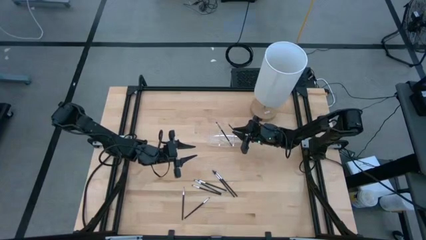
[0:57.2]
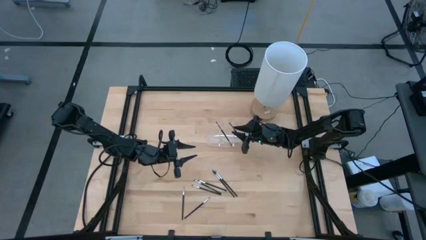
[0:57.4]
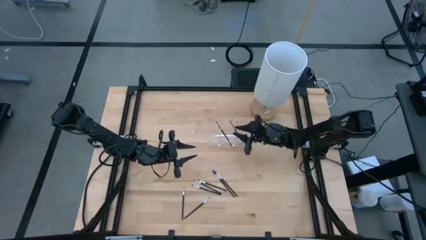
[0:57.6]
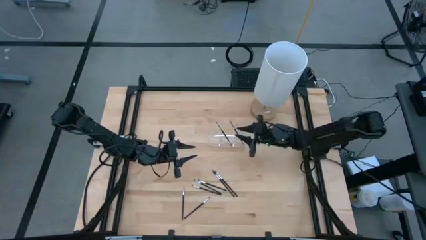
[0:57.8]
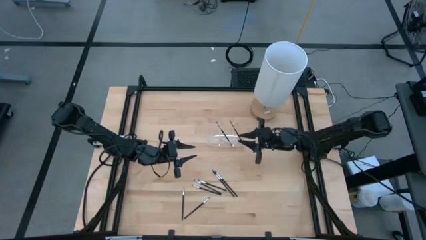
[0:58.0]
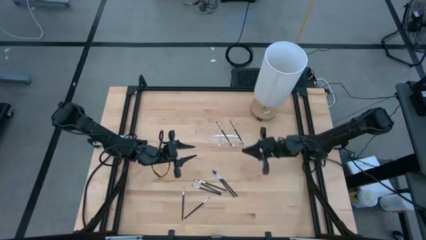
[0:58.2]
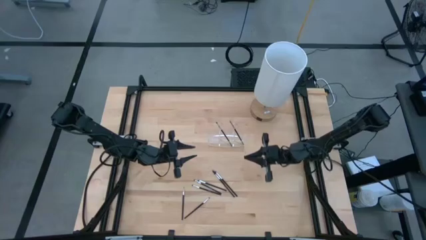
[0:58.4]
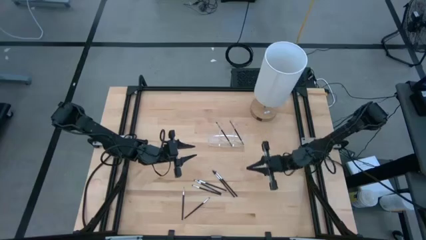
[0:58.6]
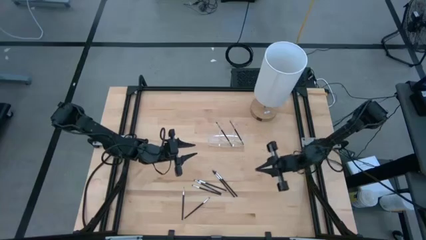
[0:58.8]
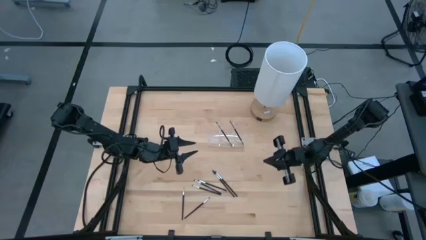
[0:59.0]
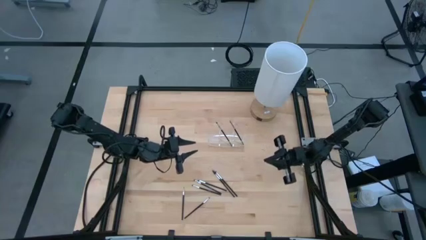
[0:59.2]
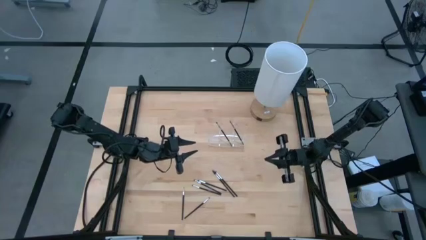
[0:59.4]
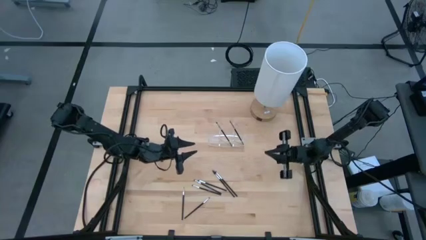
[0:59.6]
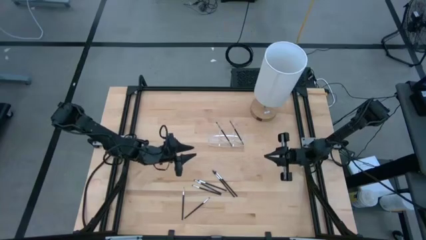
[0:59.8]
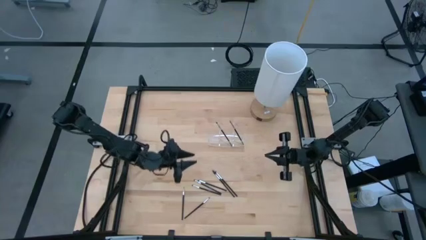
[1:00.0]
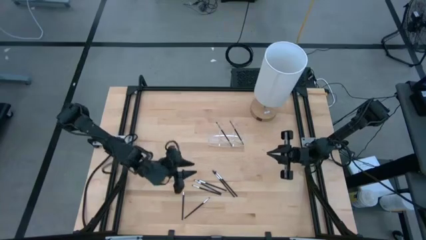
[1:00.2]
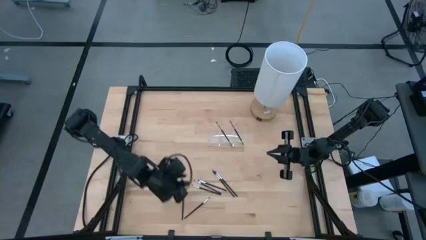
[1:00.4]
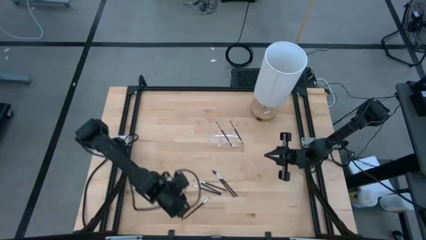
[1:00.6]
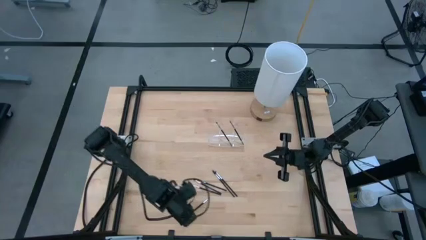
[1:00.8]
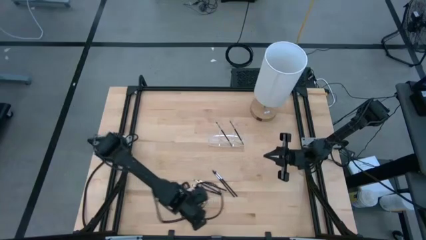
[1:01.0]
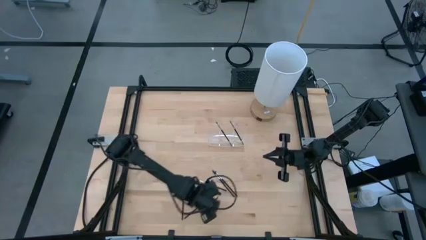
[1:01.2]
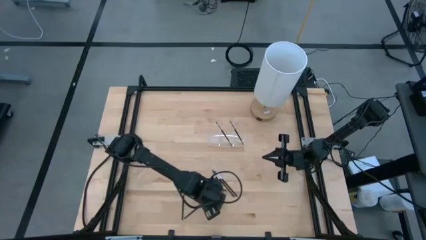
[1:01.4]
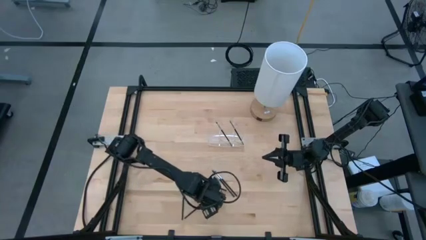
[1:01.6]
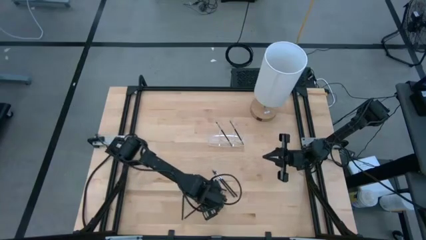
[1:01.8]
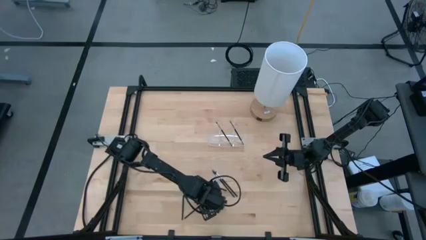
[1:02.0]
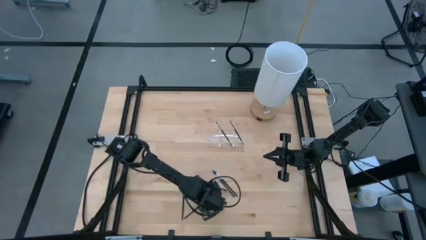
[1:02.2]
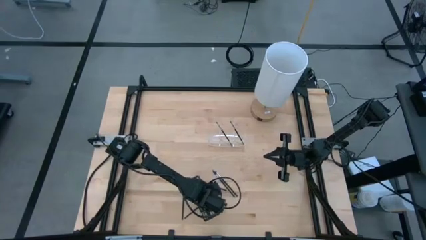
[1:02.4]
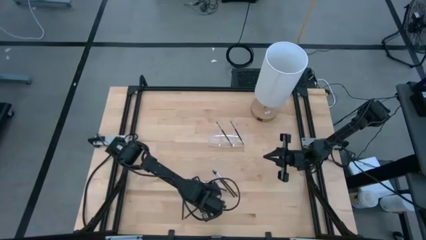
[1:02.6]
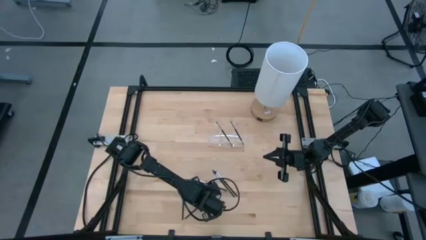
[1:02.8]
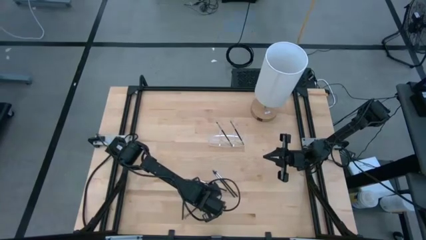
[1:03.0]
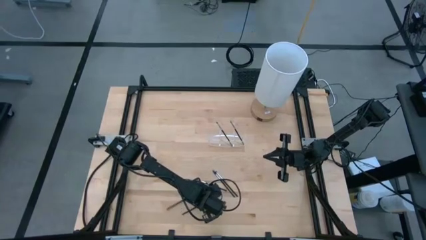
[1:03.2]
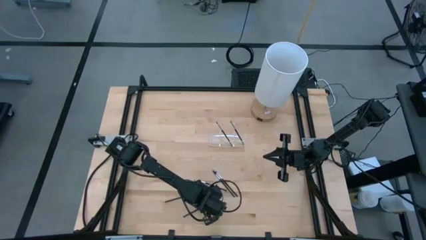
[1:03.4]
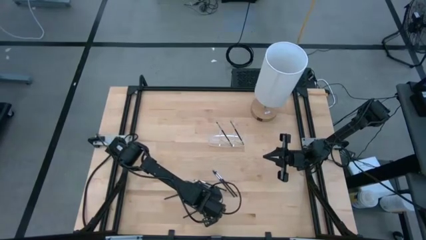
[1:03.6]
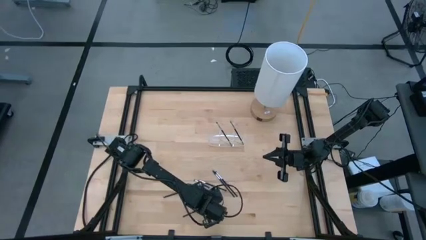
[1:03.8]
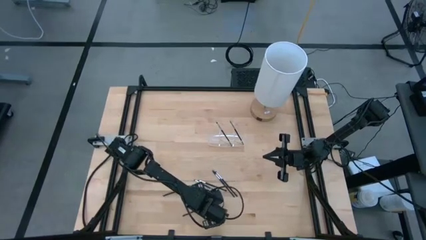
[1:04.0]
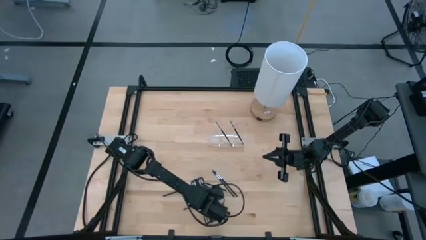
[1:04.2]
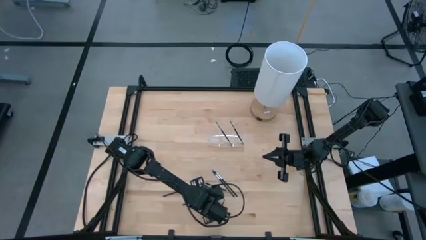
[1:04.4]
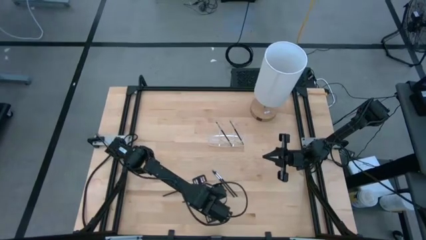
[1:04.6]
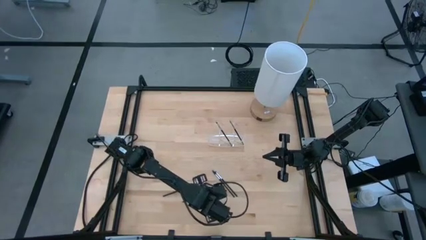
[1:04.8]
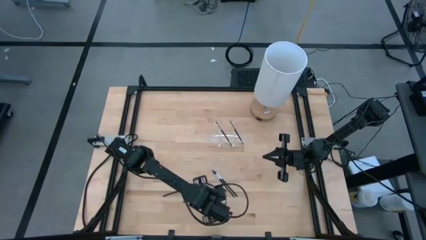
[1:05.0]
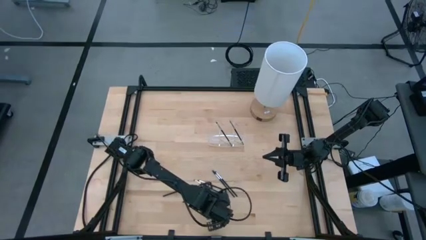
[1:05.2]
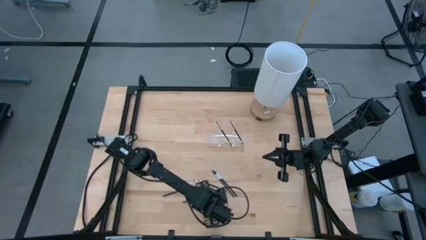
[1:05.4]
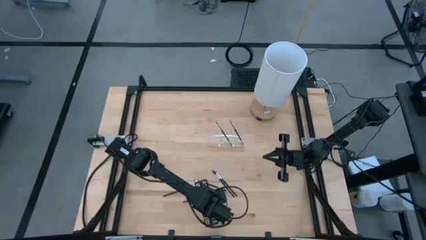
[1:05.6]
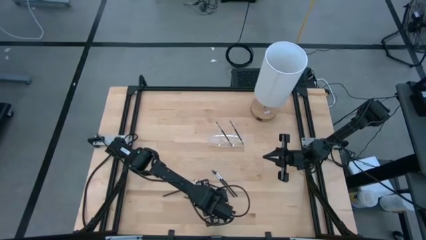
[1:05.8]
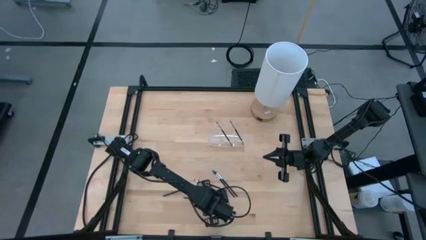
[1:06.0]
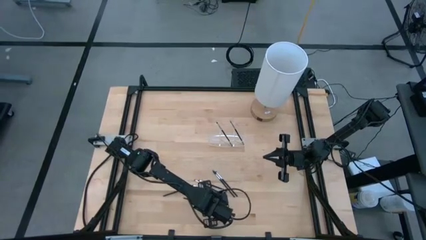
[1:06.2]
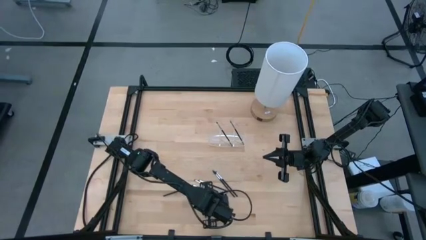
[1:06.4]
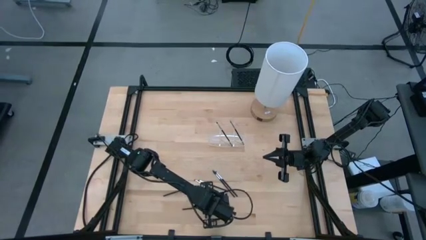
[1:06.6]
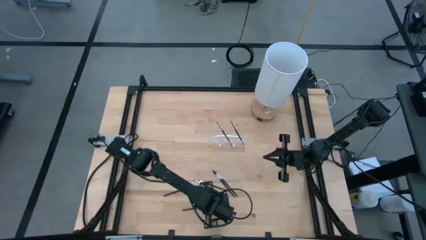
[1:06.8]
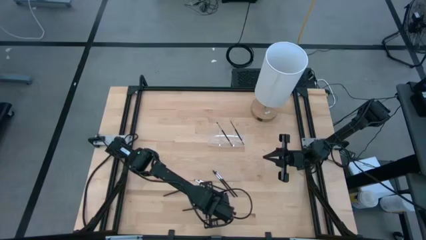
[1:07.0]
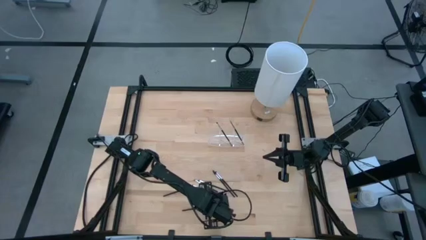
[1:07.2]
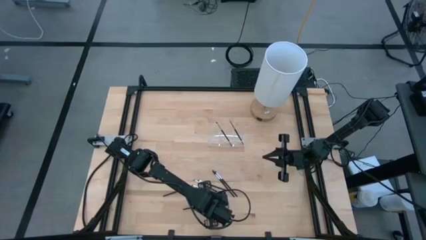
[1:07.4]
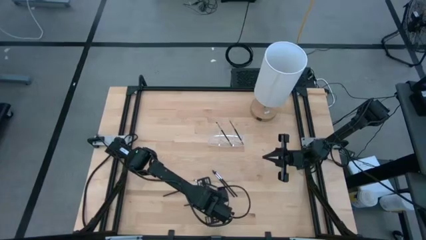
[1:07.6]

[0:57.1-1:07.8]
Task: Put items in baskets/containers
Put the black eyeshadow brush into the left section of the transparent organizer

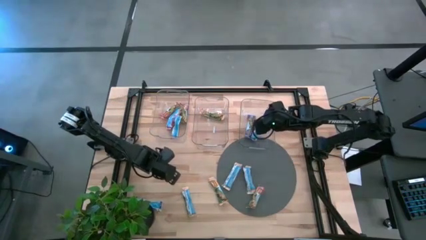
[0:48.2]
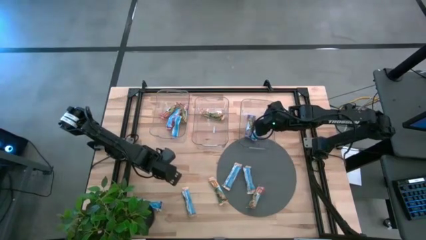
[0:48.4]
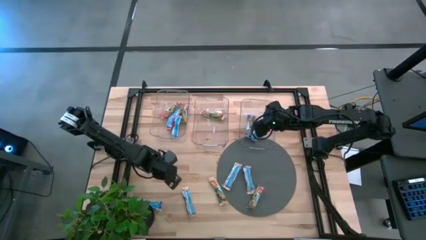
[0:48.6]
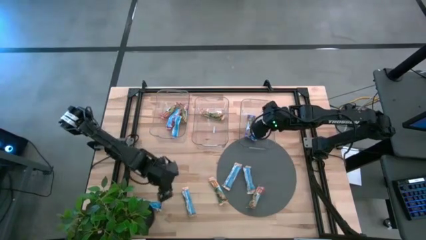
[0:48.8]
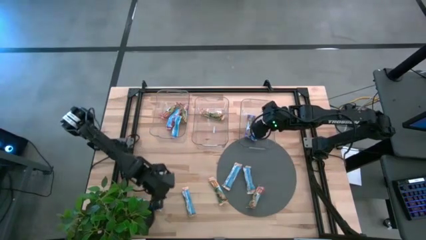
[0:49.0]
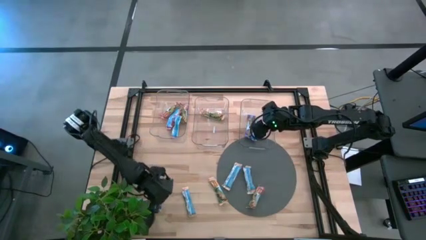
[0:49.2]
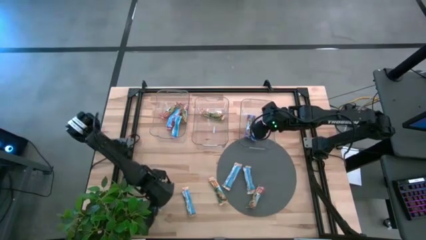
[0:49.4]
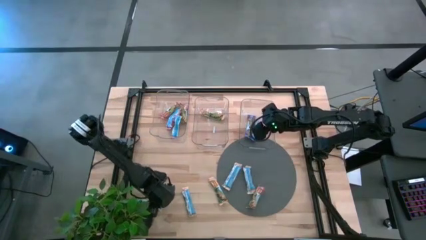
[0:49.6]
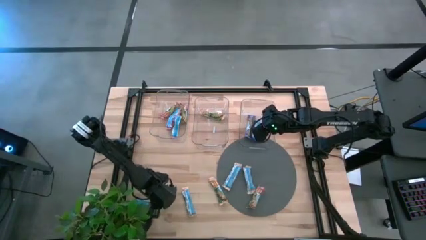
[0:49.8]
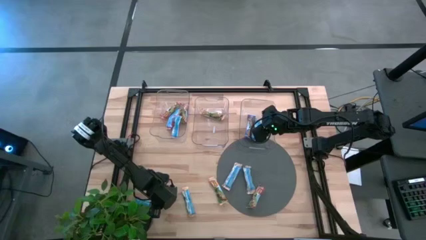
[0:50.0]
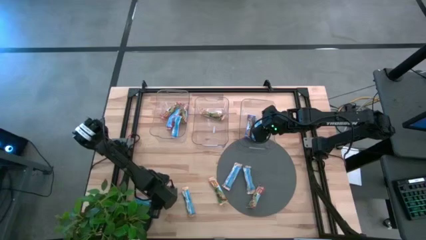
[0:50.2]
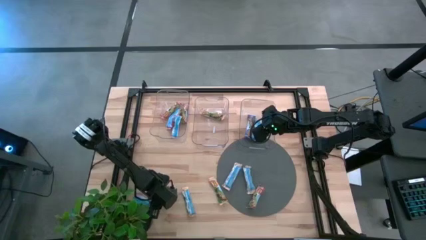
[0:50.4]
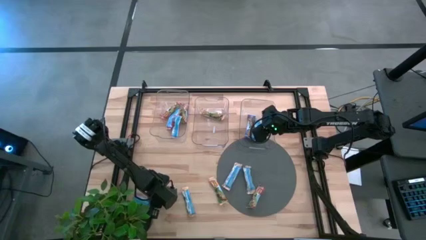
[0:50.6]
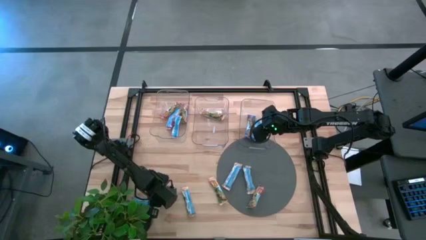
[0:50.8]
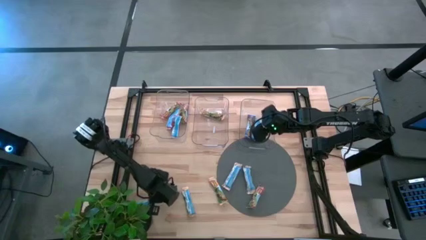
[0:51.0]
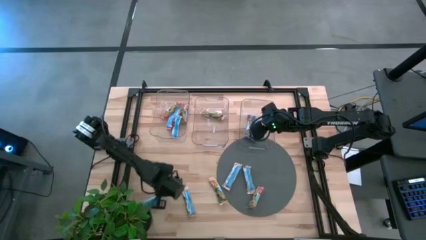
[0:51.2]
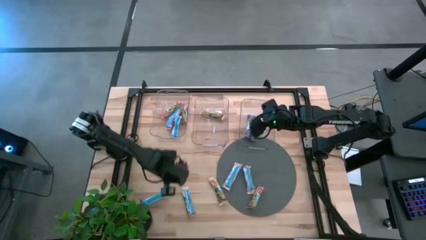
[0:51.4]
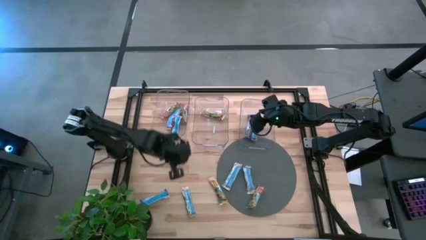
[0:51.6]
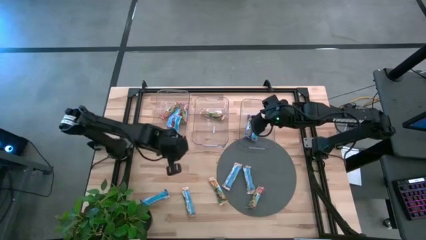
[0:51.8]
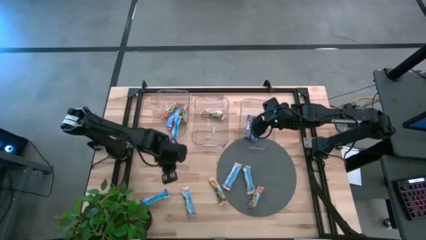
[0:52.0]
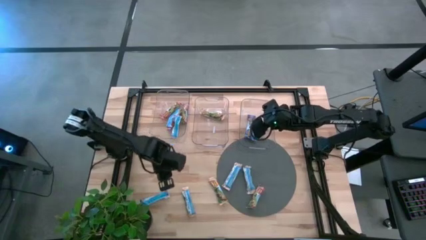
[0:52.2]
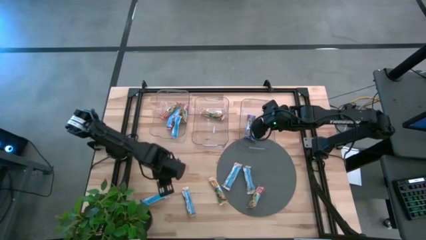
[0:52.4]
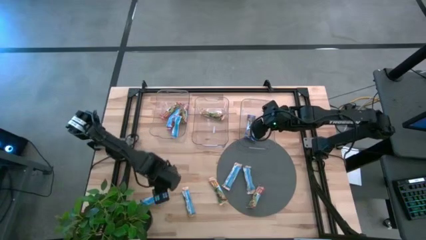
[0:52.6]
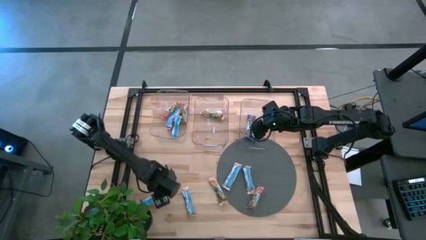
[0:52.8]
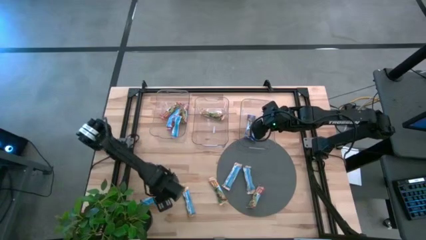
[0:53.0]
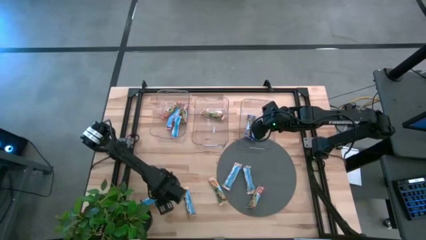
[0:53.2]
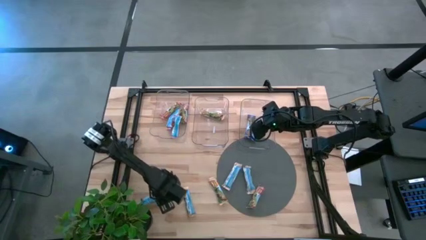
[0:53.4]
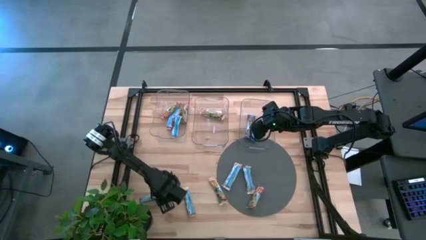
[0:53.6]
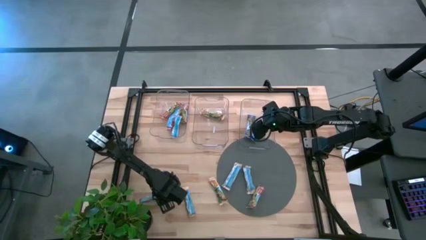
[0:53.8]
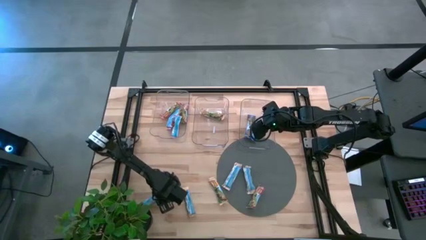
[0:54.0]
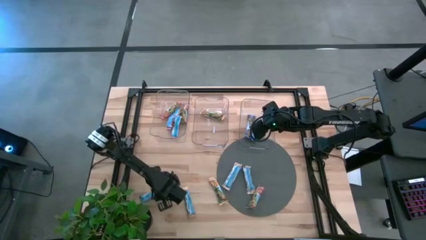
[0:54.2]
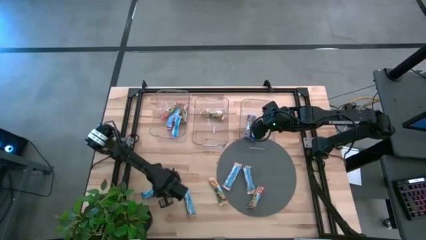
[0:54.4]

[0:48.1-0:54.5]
Task: Pick and place Granola Bars by type
Put the blue snack bar into the right transparent bin
